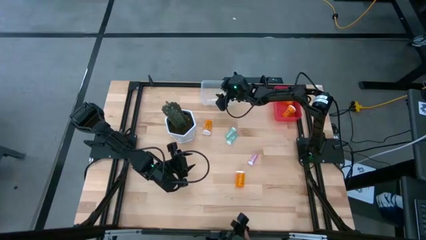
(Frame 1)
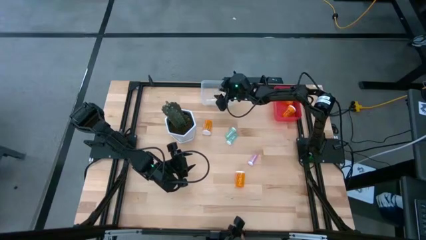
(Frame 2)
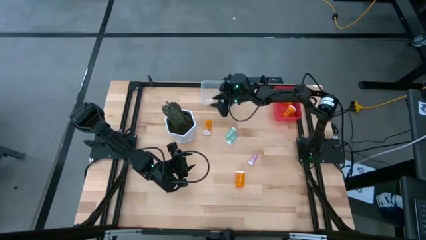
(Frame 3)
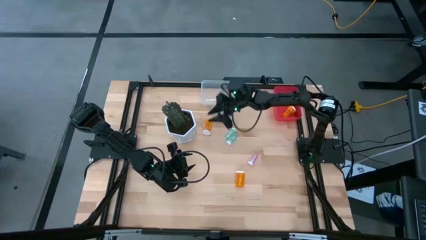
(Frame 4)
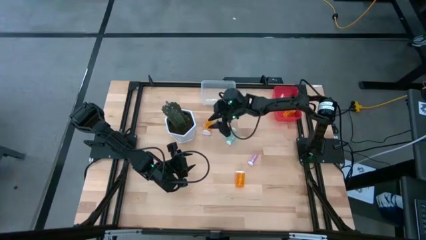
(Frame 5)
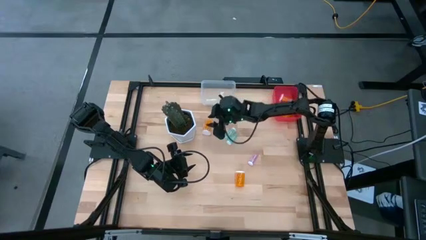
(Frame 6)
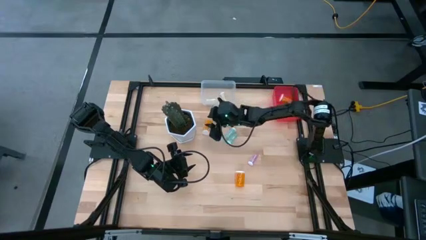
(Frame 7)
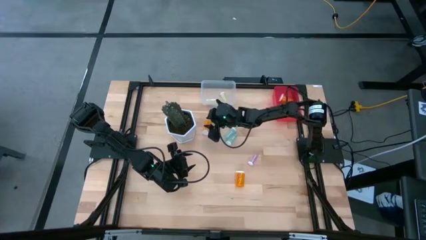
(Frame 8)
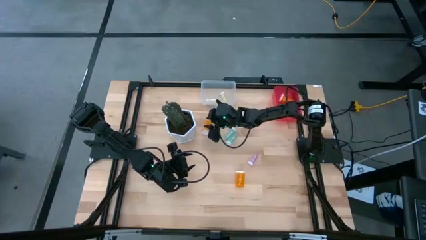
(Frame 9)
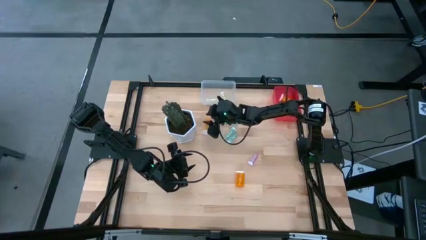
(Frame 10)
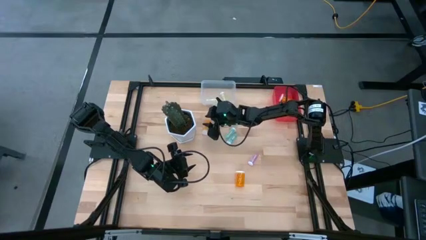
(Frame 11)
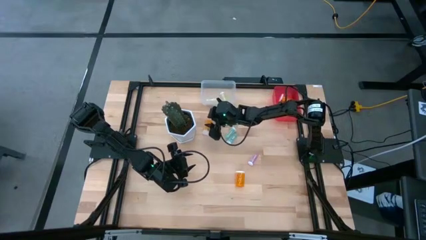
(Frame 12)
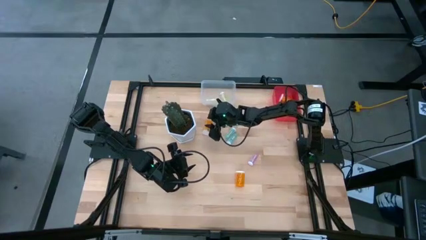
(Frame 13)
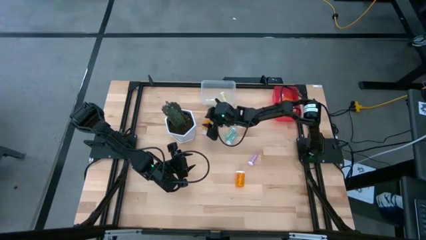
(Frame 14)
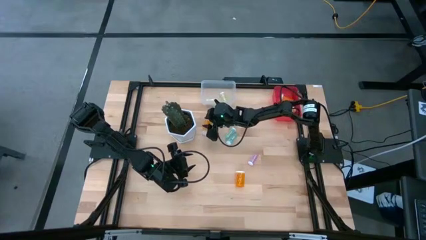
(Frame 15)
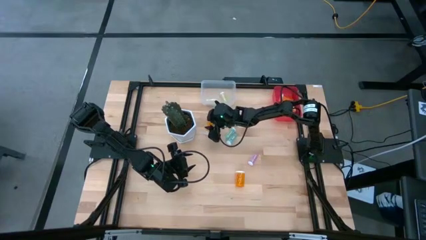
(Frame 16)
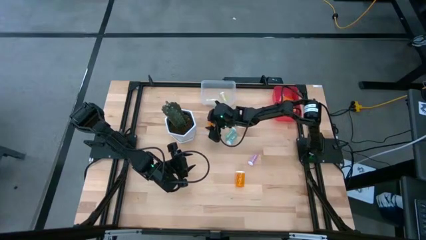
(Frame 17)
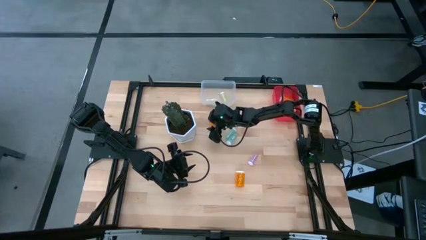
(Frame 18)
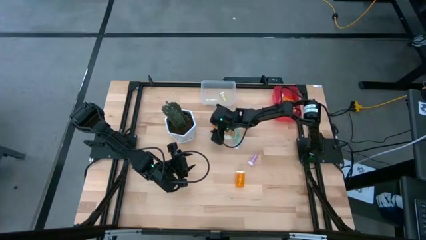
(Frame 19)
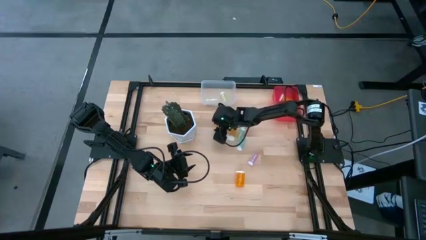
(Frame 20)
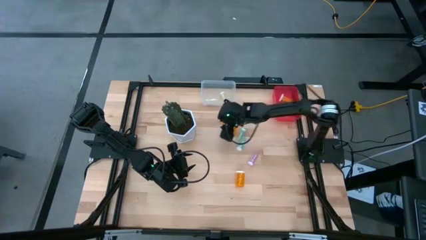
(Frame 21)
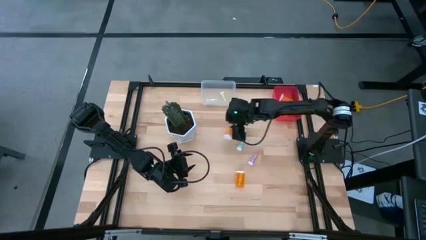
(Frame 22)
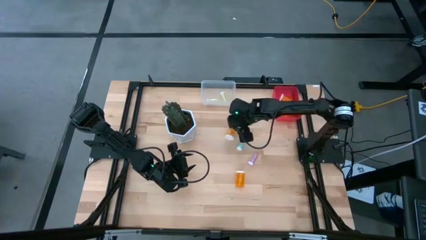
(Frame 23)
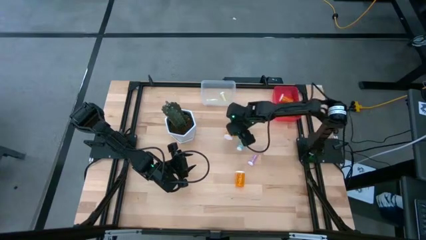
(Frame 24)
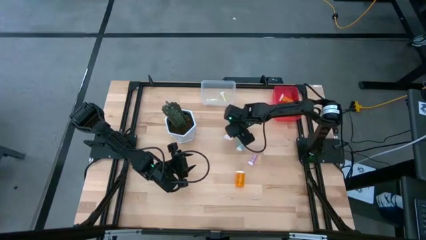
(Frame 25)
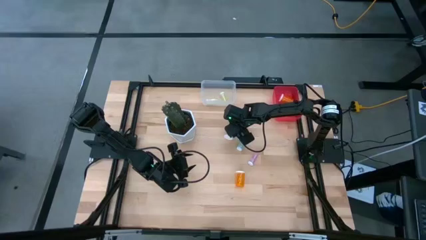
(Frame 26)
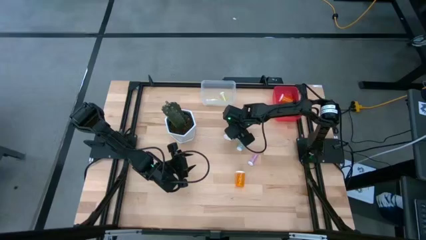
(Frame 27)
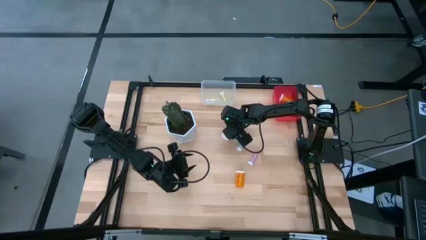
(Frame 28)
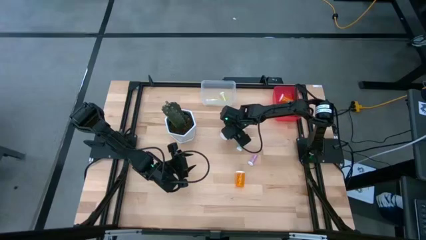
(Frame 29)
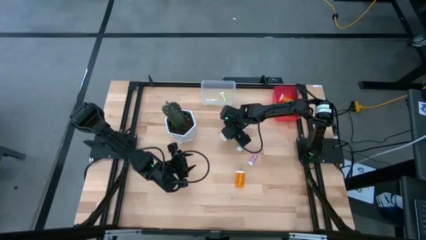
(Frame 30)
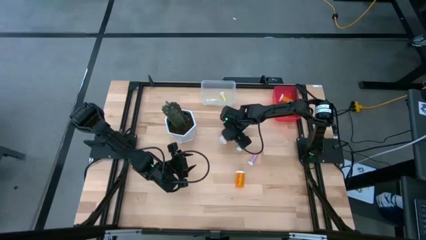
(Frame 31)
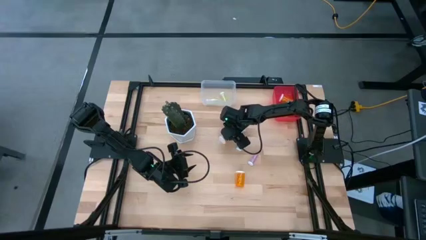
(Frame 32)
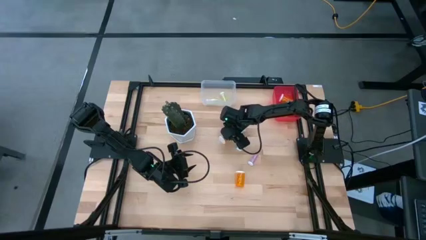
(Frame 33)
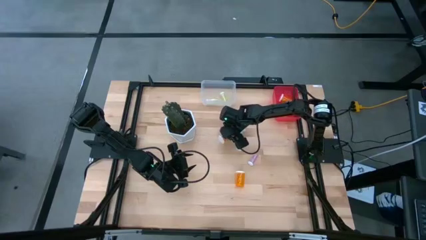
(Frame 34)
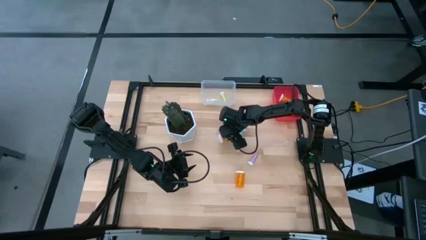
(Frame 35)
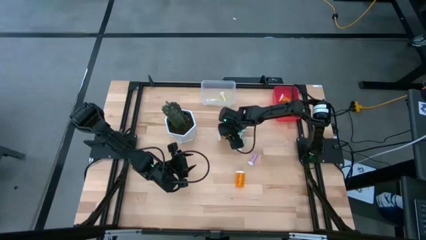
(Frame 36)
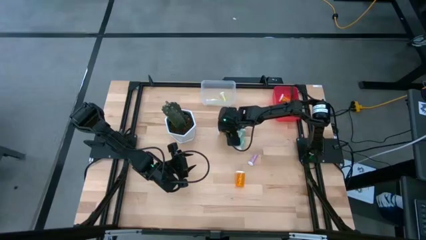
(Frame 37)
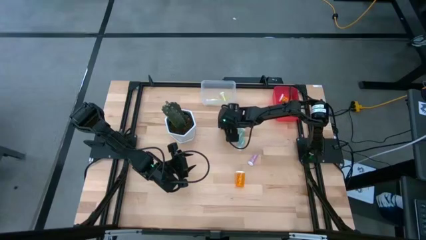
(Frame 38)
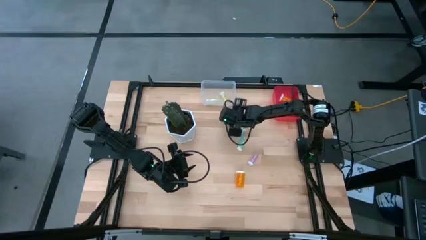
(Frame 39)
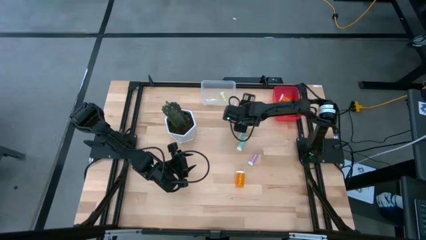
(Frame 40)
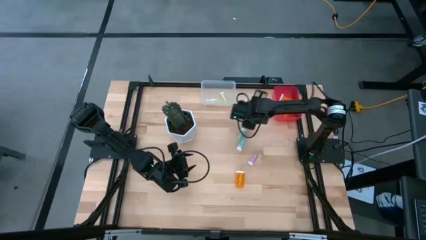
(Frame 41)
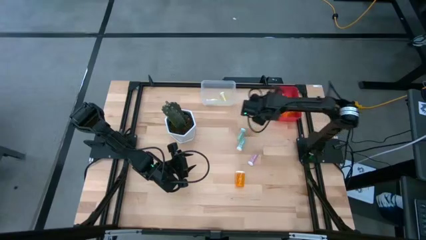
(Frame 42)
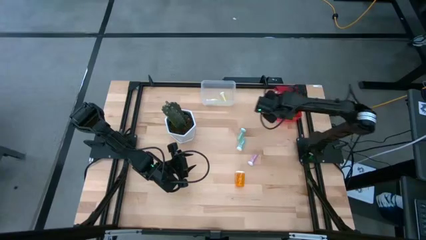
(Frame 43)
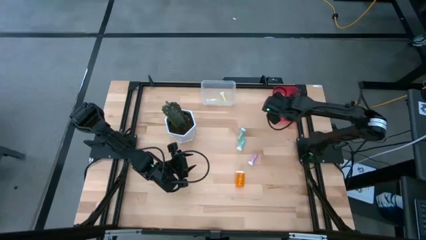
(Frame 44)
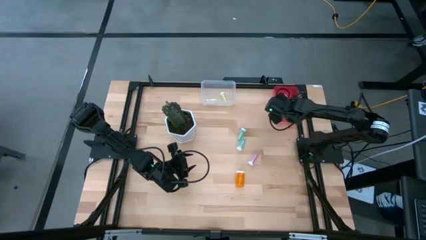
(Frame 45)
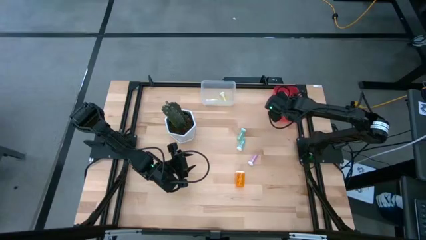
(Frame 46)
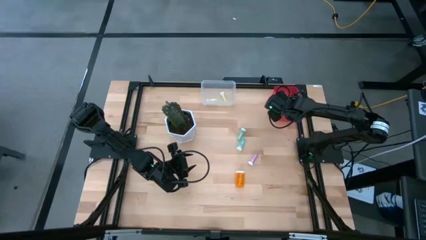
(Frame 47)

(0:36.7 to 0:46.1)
Task: Pick and place medicine bottles into bin by pill shape (circle, oval)
Put the large orange pill bottle into the red bin

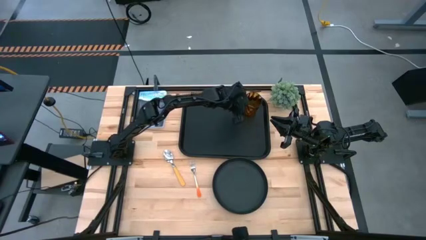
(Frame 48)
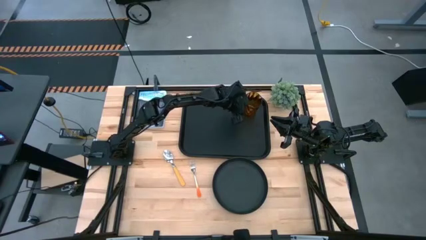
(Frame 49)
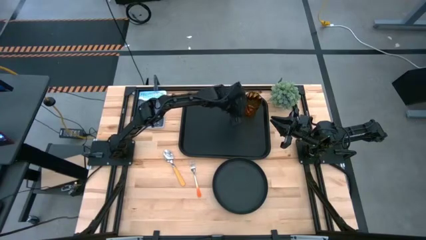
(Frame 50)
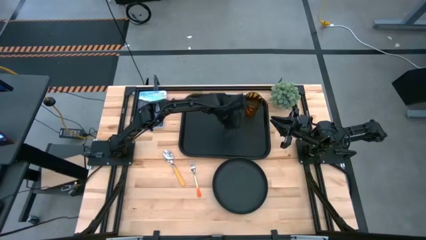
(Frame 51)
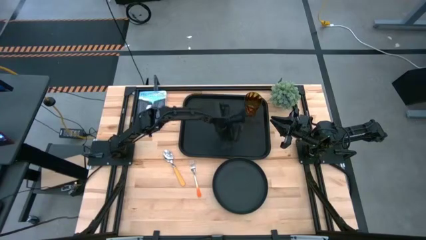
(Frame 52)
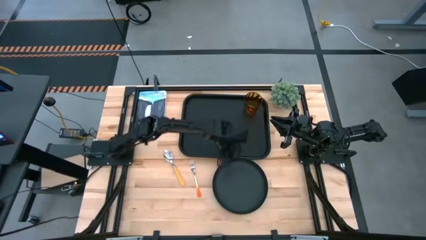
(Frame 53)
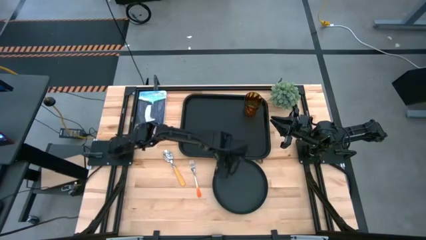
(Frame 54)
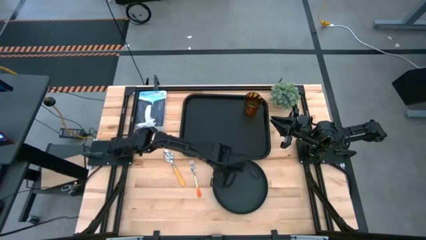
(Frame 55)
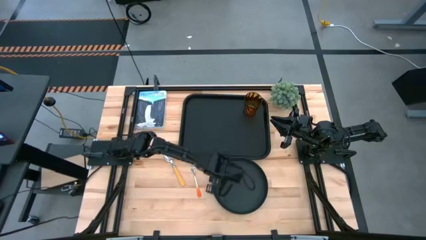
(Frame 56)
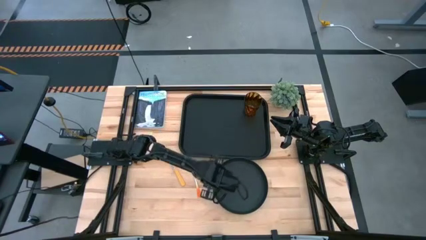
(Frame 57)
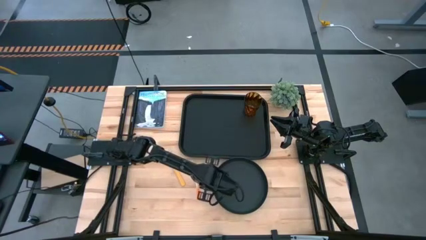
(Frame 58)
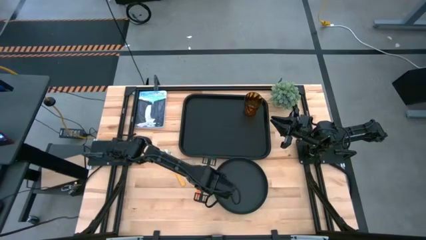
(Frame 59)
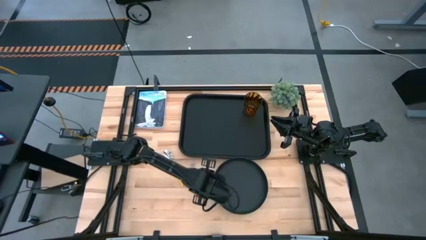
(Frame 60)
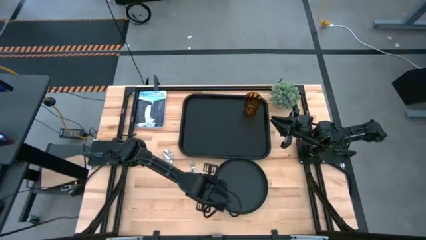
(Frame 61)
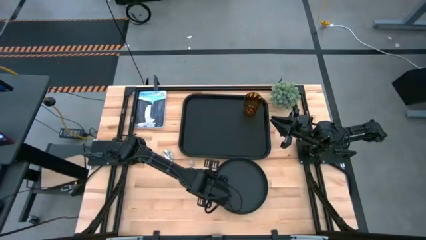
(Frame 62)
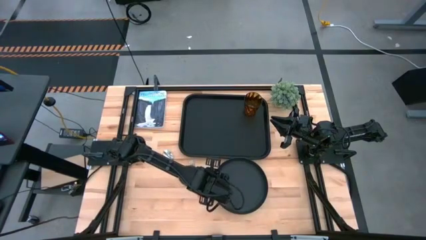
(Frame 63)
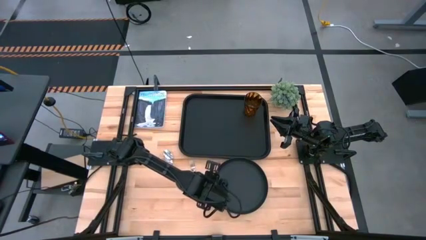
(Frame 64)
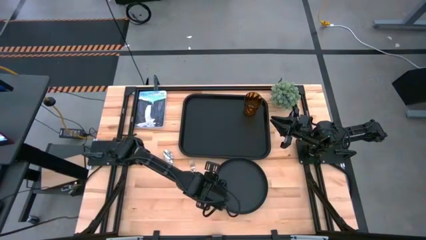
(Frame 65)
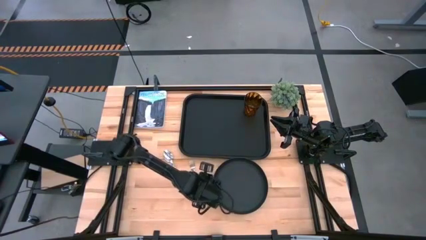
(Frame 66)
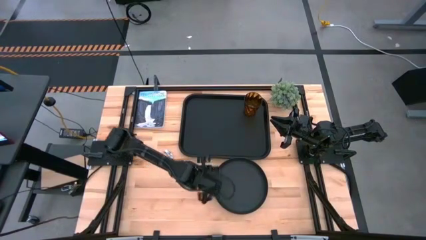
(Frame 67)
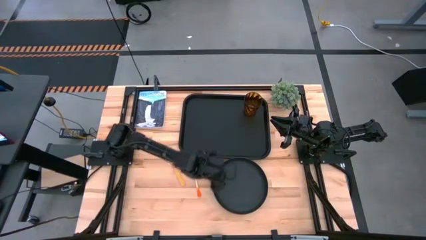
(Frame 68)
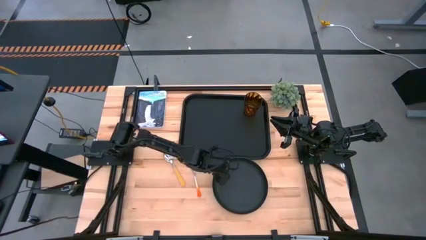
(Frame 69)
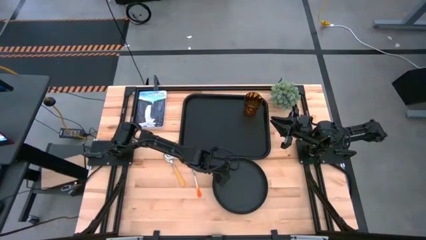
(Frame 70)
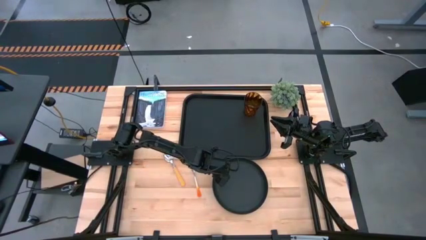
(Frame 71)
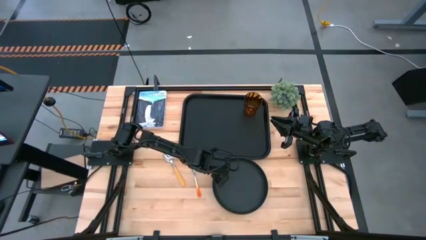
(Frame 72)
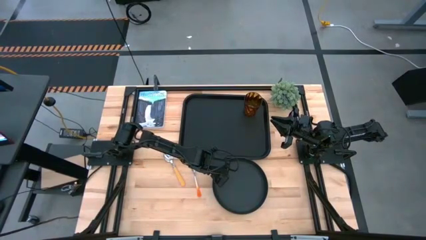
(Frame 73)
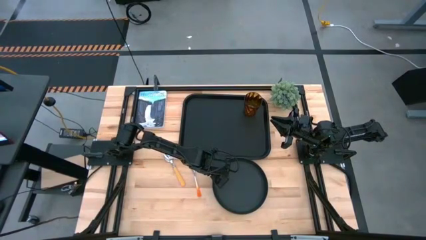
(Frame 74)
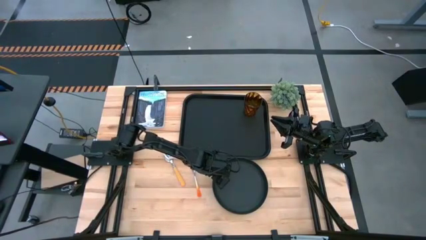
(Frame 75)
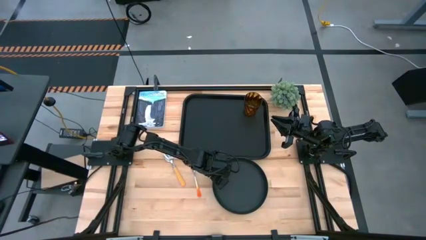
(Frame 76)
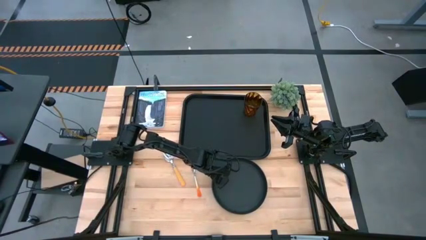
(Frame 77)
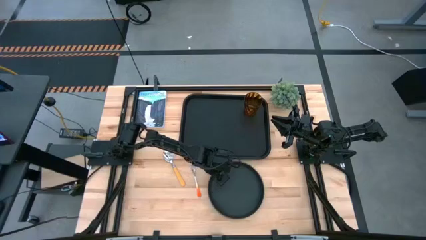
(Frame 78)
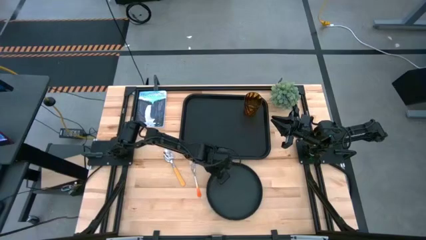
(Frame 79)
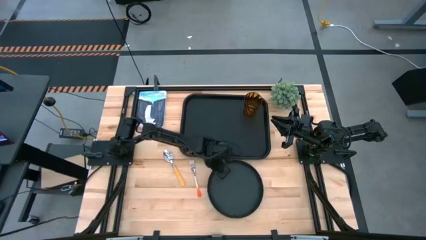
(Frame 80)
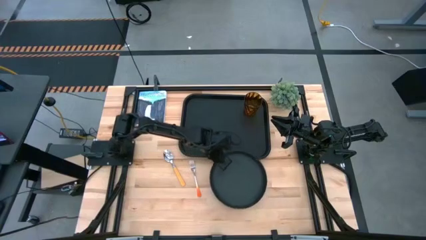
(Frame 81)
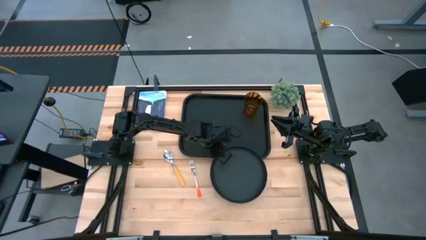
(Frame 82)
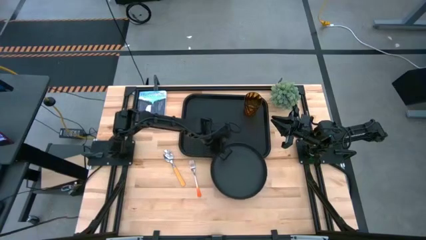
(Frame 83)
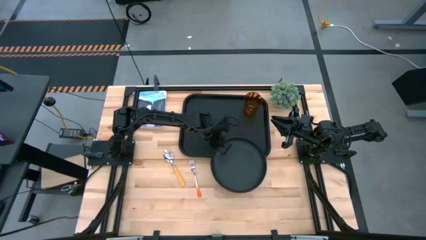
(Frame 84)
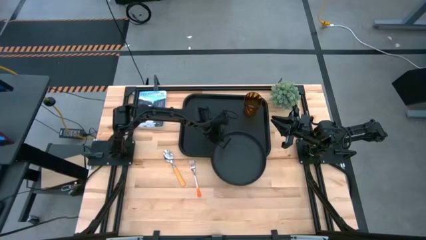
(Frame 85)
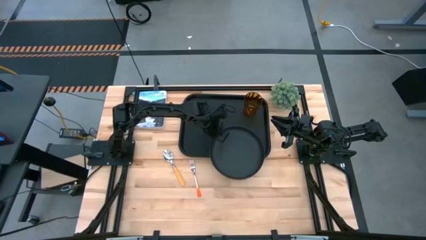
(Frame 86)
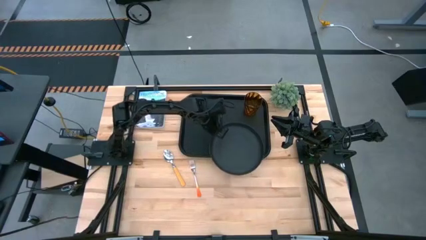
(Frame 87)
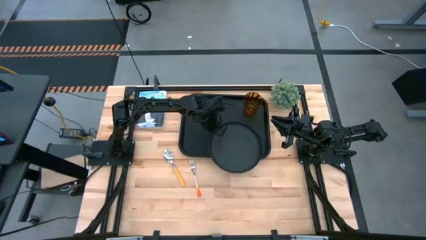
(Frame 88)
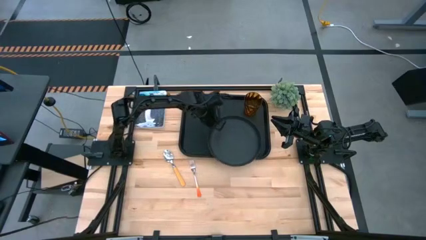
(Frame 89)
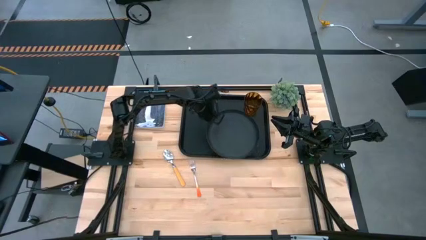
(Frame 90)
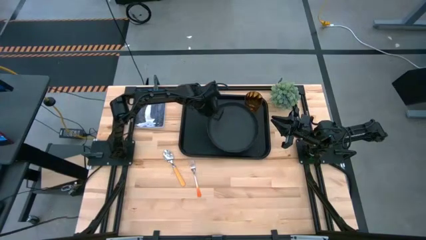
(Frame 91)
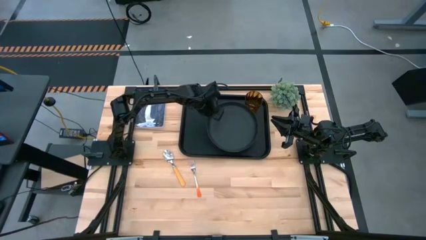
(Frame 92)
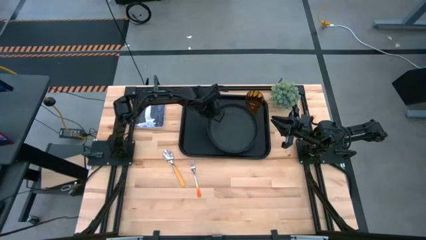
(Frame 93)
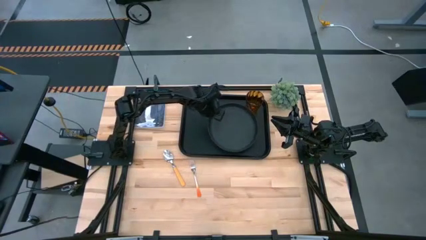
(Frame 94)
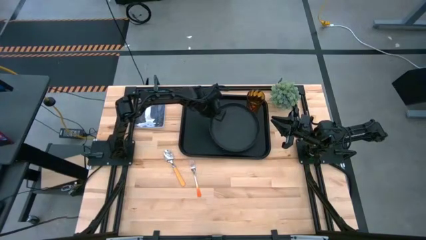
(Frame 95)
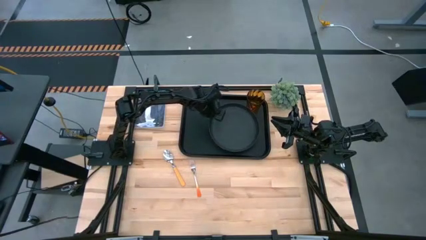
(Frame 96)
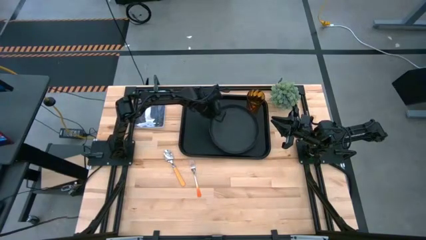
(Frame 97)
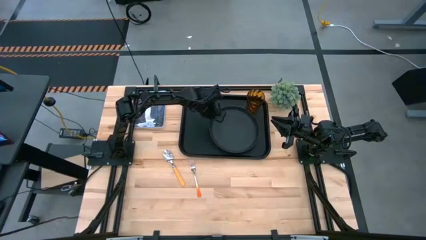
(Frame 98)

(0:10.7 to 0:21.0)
Task: Pick and place plate/cup/fork/spoon on tray
Put the black plate on the black serving tray
